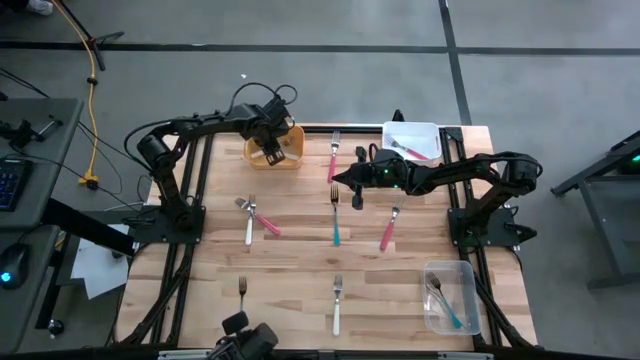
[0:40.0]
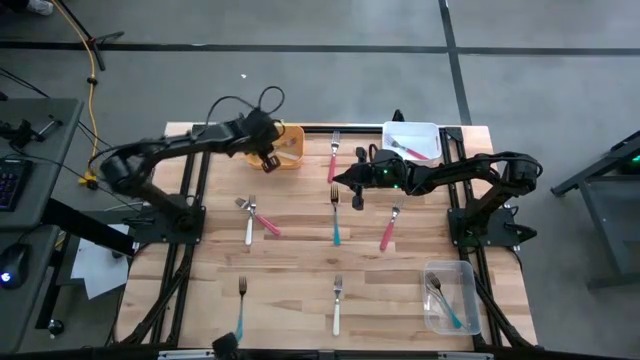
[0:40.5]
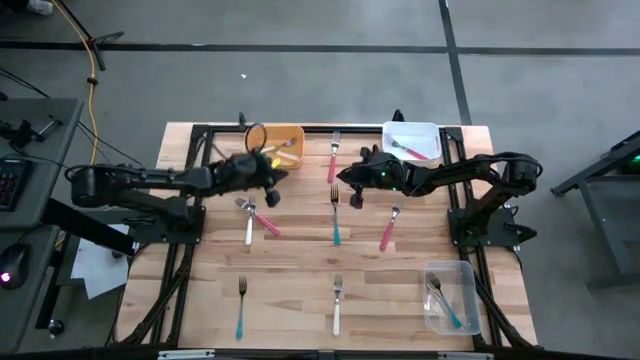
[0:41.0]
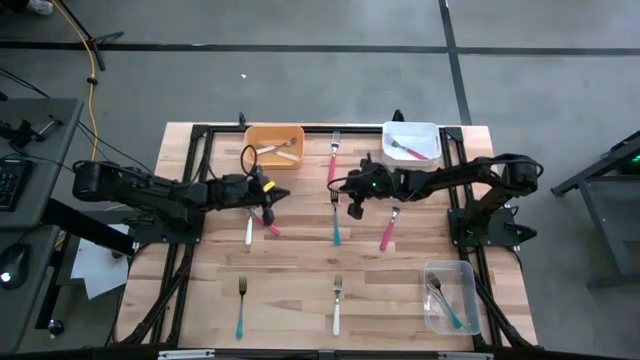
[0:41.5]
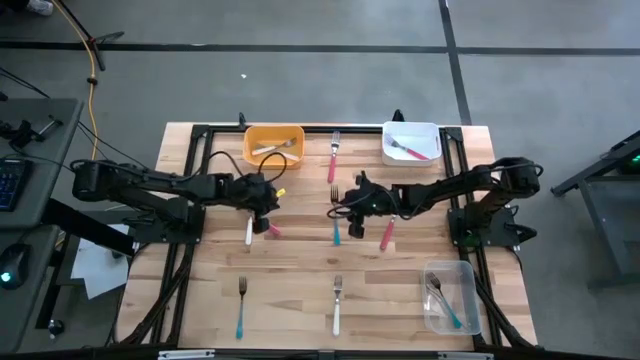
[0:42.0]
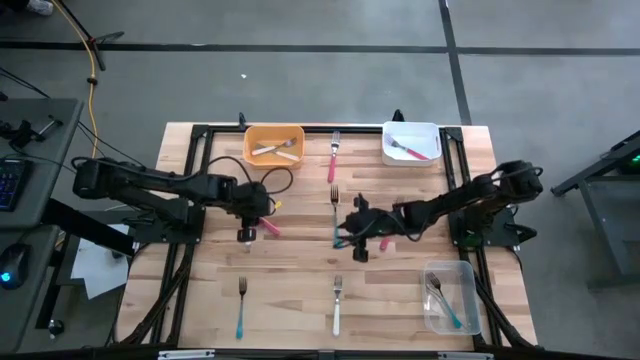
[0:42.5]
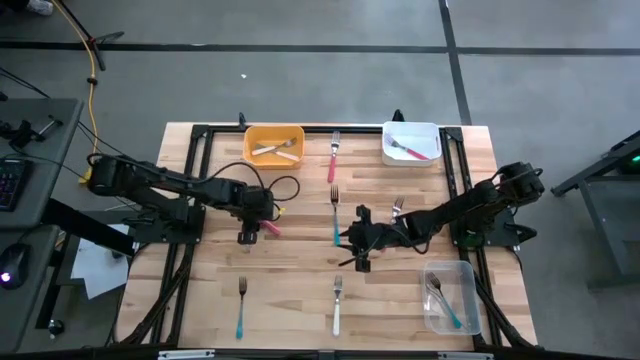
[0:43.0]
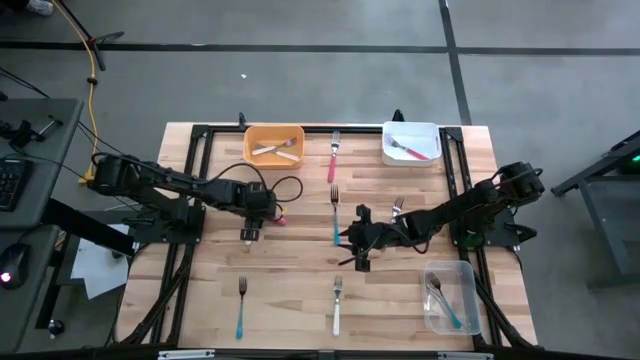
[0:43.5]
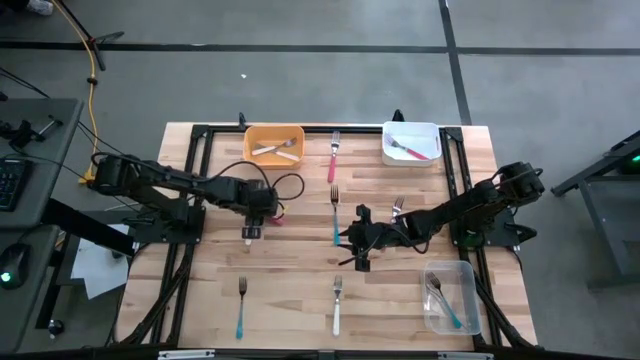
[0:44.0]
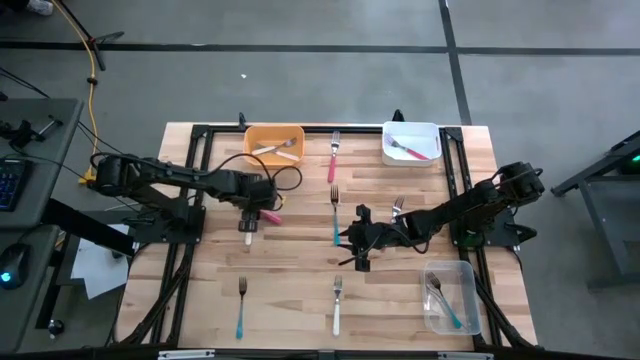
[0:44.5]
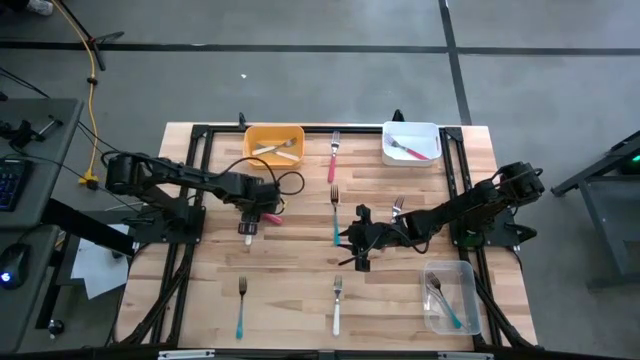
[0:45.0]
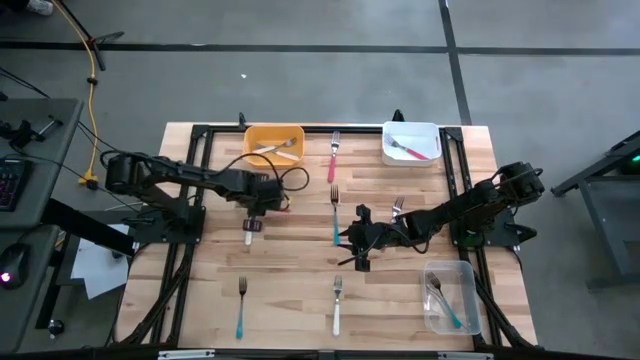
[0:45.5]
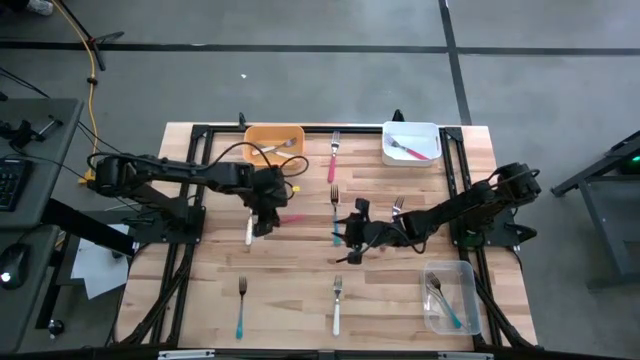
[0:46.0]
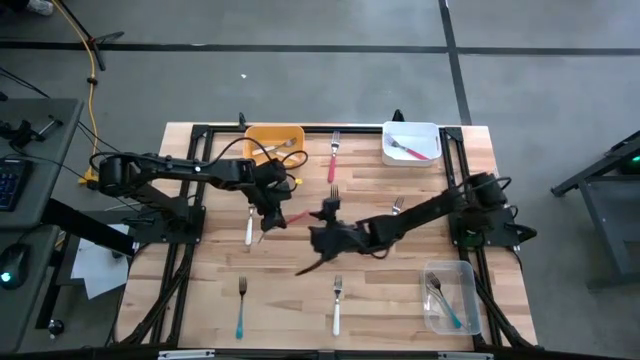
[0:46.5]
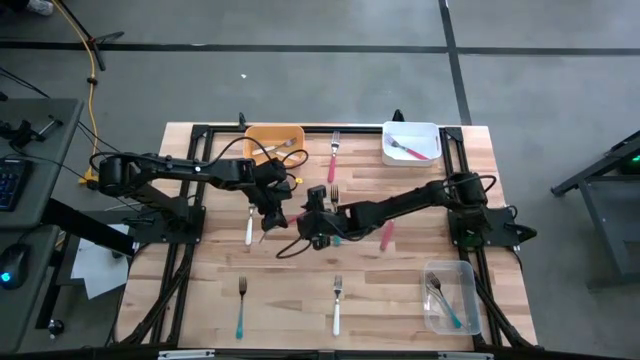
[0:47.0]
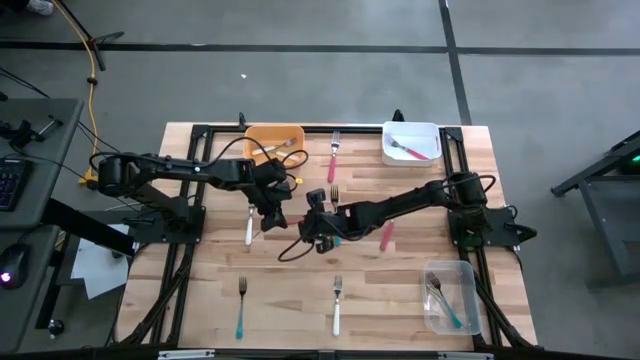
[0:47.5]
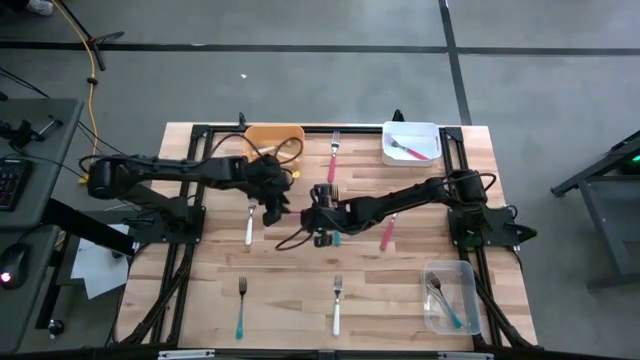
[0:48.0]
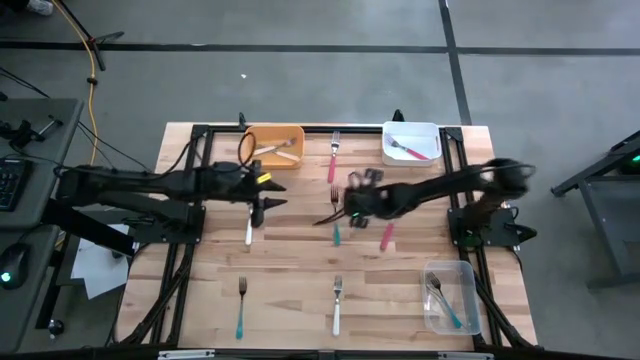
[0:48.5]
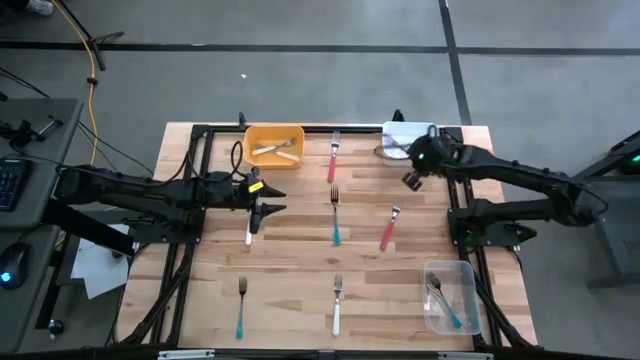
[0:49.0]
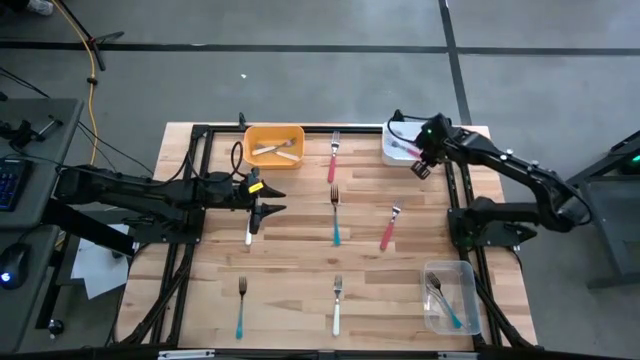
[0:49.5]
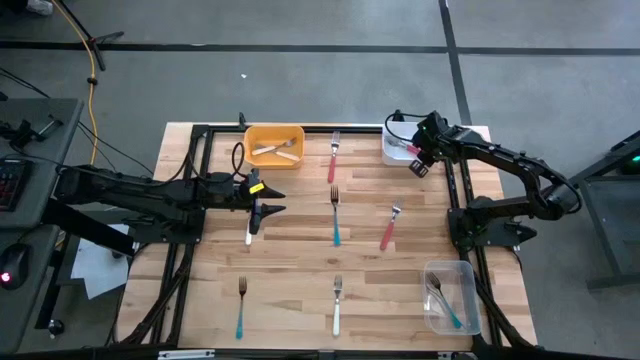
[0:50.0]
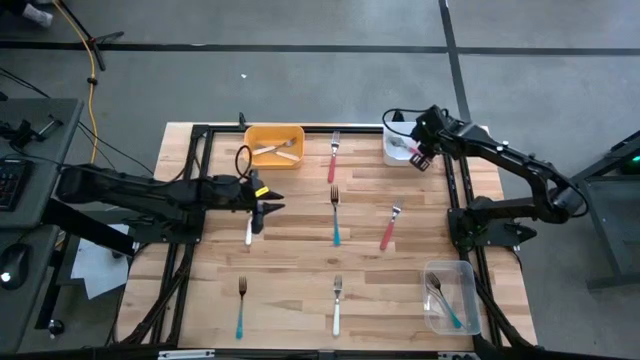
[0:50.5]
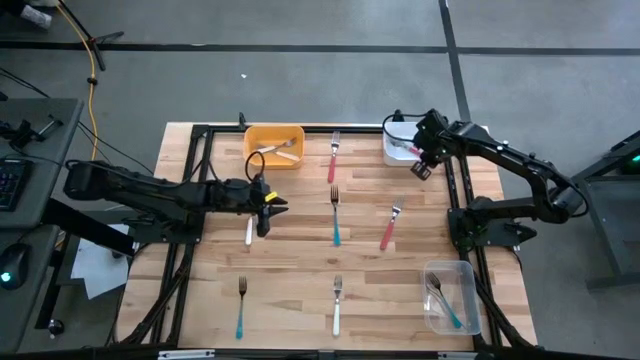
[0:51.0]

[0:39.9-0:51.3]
Task: Sort silverware by color (type)
Put the bottom left pink fork into the white bin

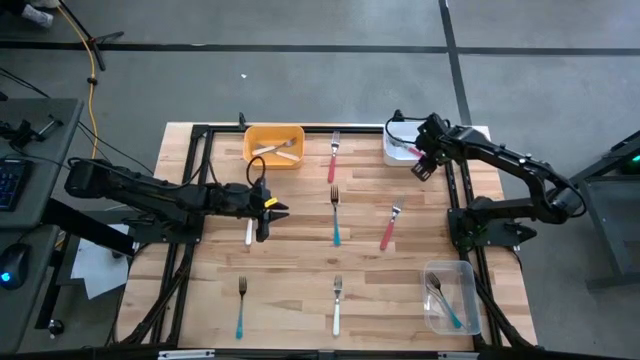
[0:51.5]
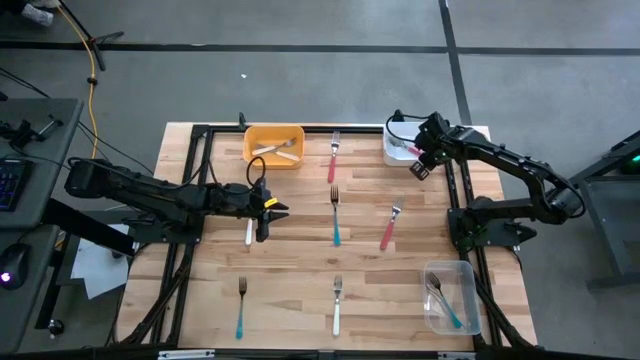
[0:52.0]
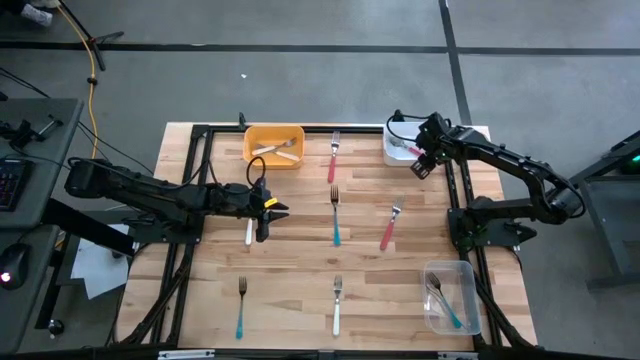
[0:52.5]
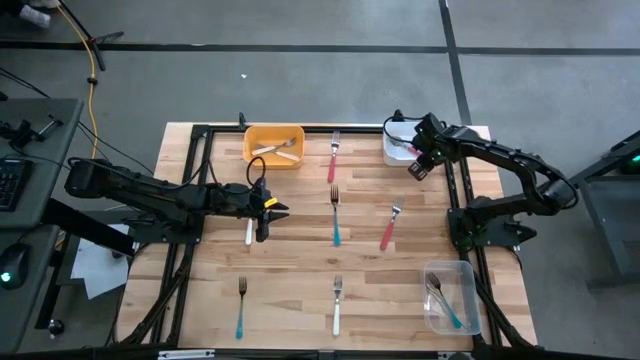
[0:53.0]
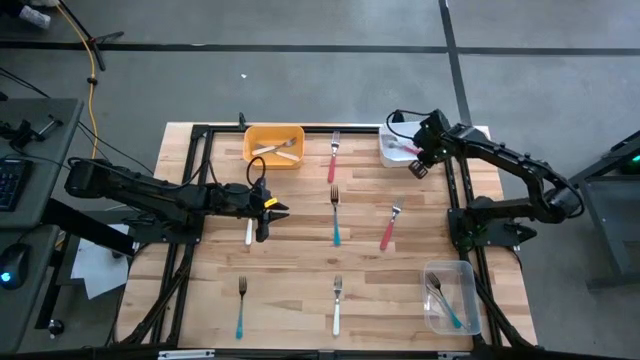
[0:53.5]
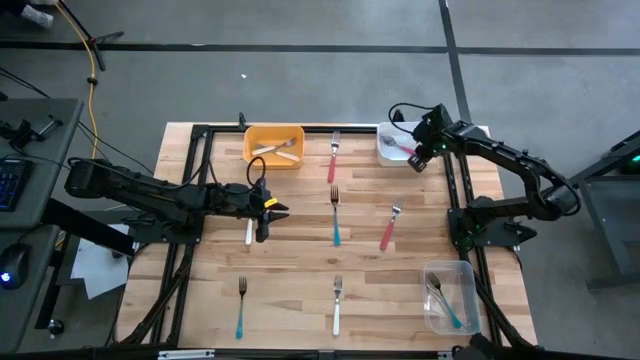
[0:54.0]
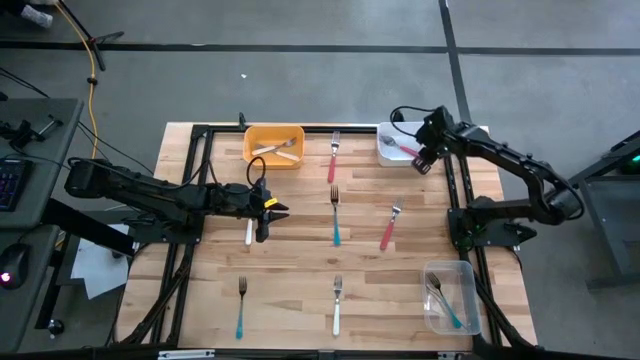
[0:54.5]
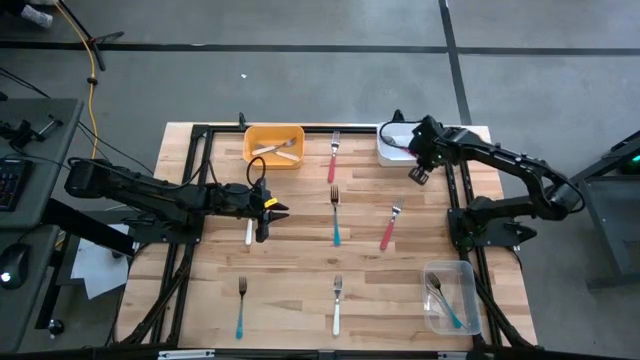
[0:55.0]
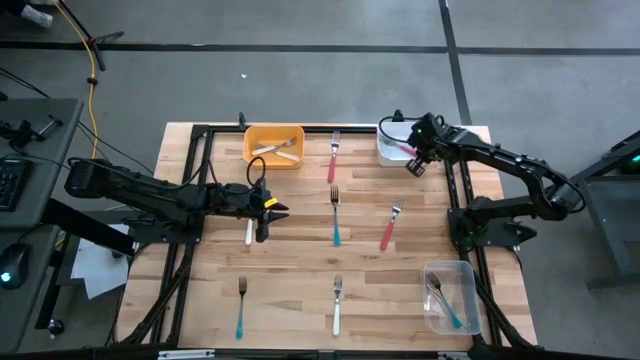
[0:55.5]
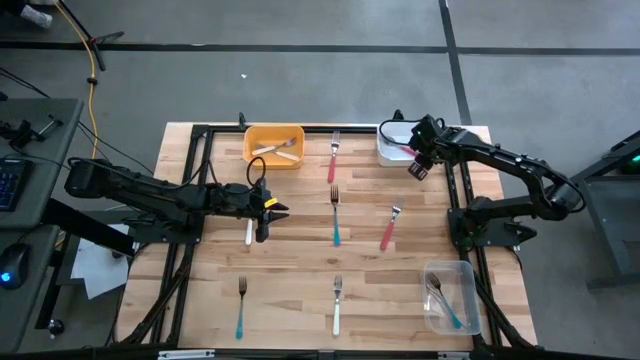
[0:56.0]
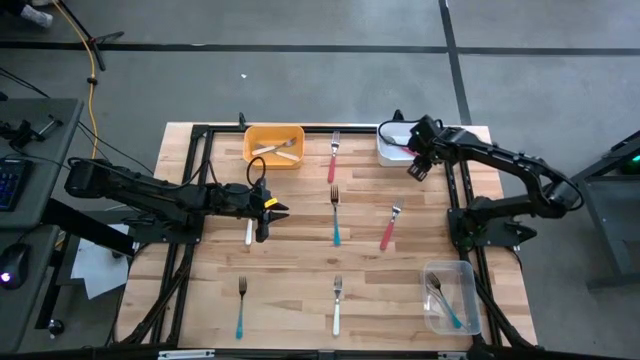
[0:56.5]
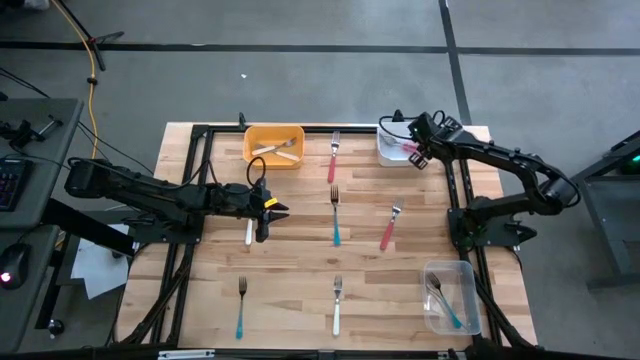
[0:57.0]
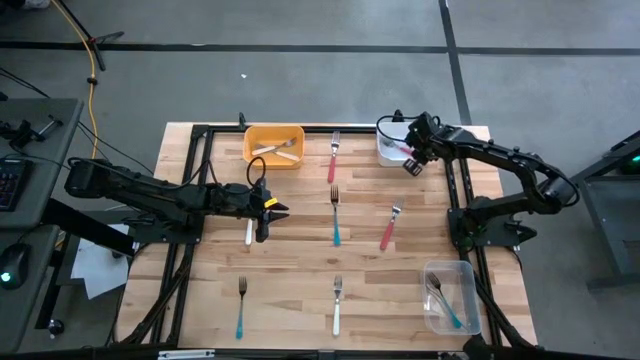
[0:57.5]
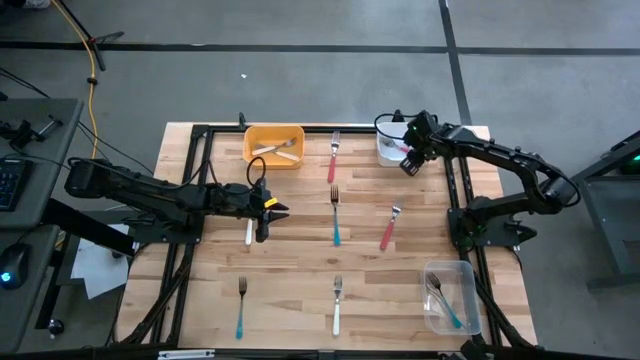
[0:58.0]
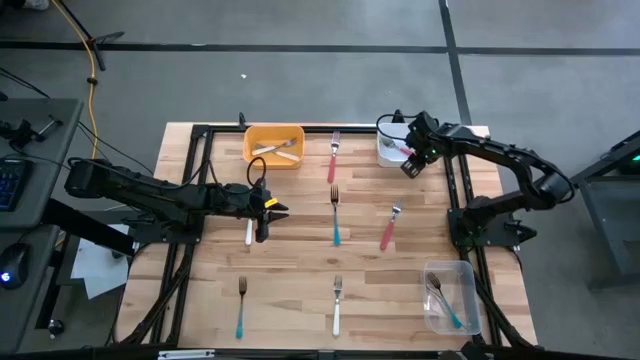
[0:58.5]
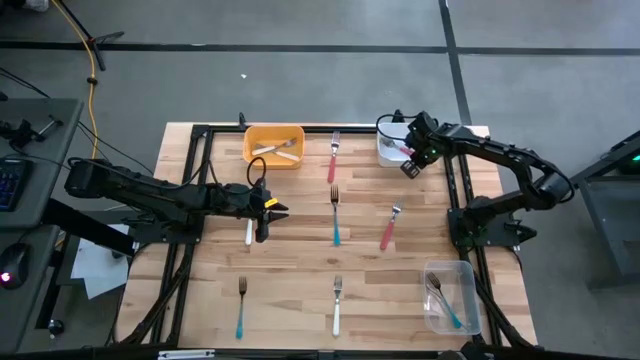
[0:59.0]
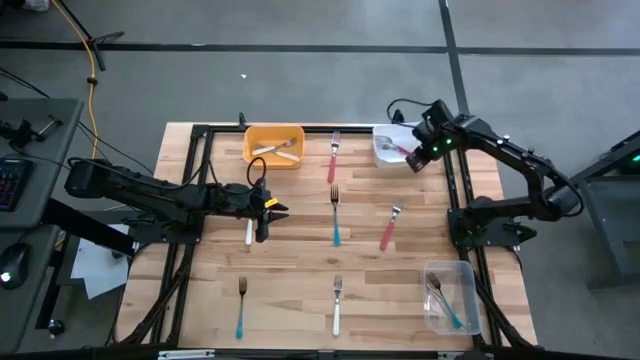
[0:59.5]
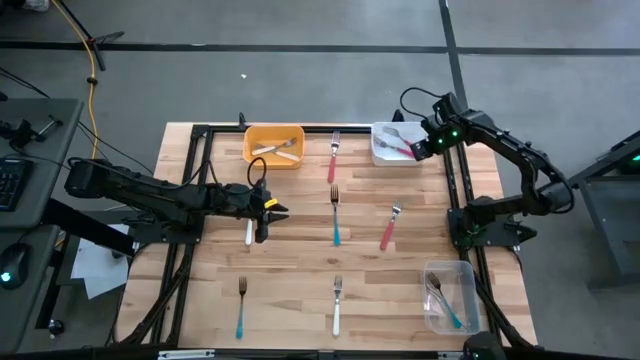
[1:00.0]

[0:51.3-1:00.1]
Put the bottom left pink fork into the white bin

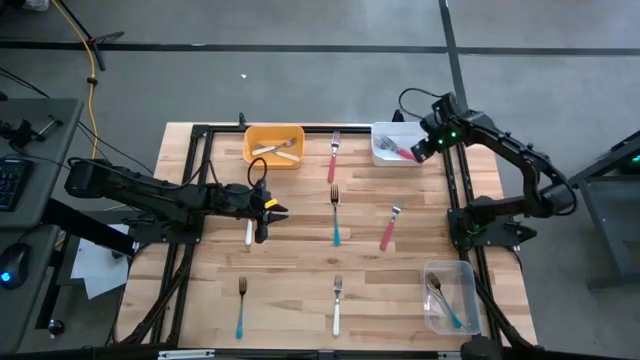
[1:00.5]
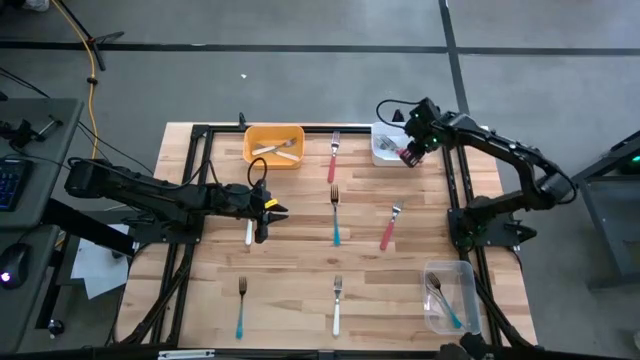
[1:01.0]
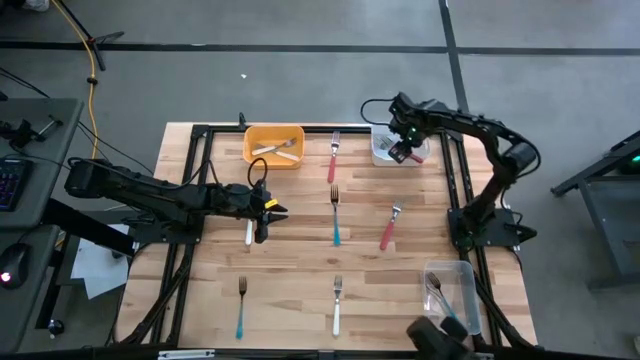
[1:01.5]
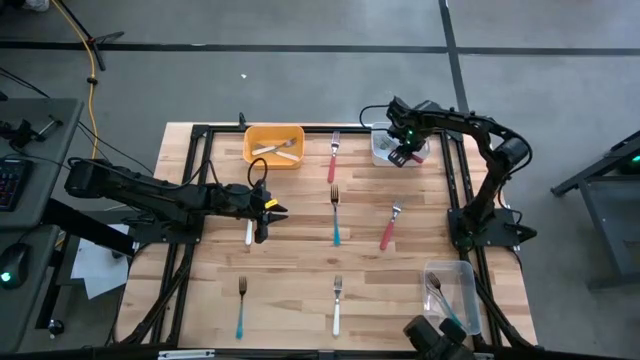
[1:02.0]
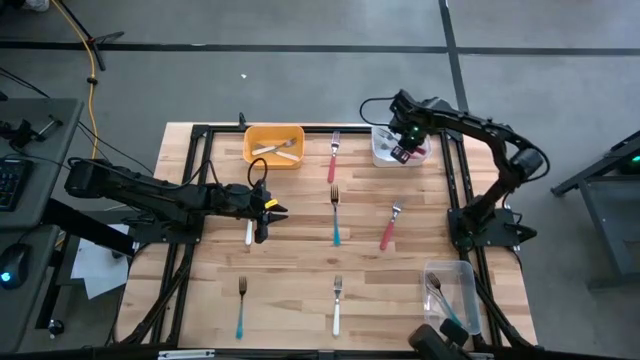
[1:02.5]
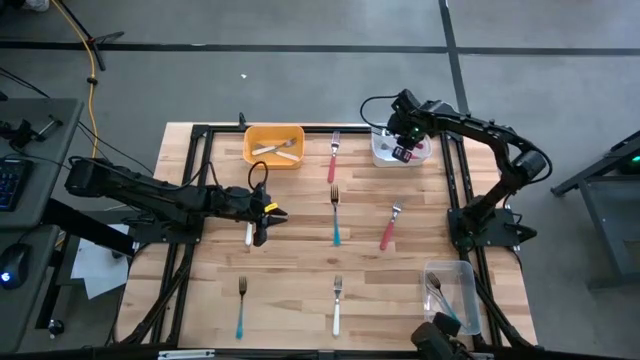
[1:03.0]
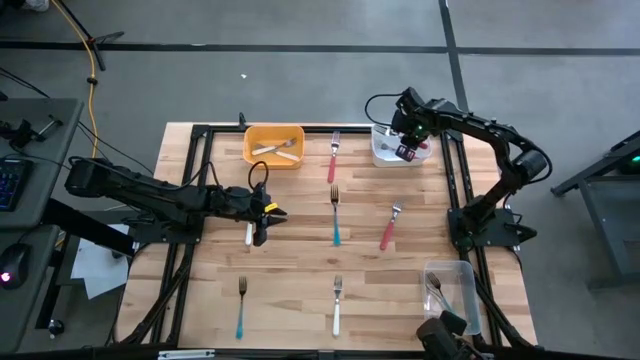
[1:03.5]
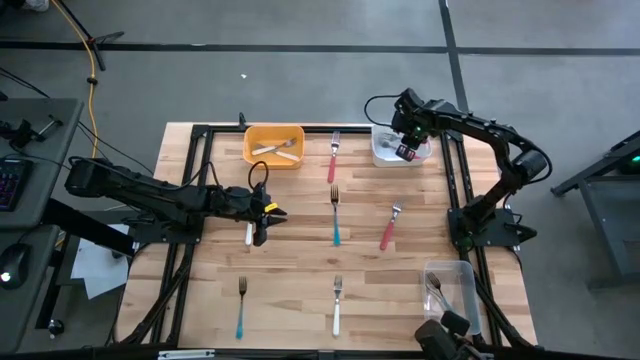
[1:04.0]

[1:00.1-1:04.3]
Put the bottom left pink fork into the white bin
